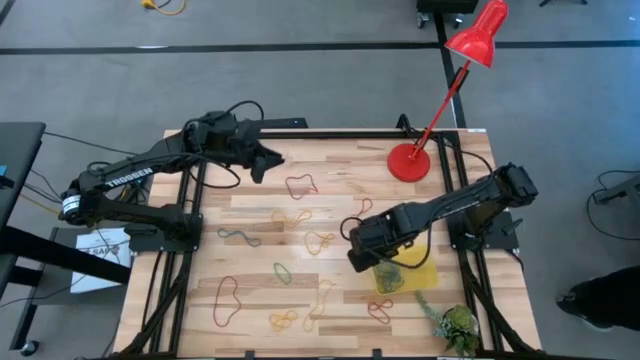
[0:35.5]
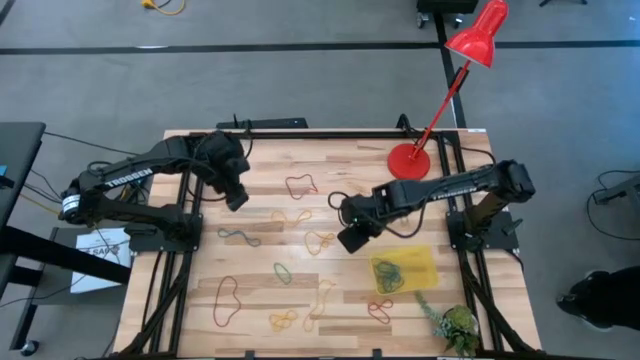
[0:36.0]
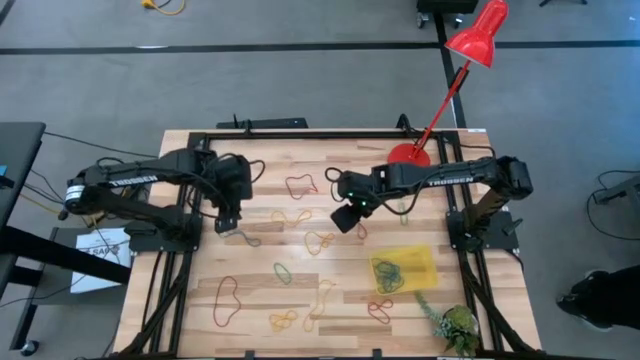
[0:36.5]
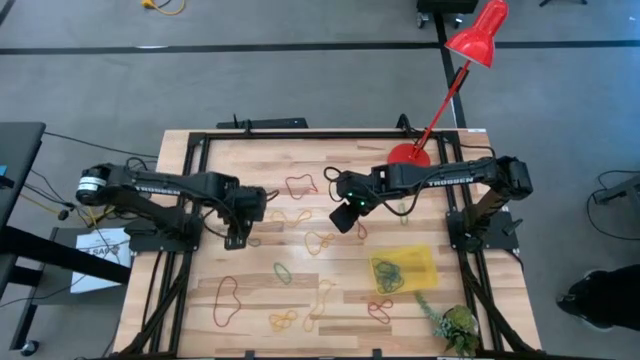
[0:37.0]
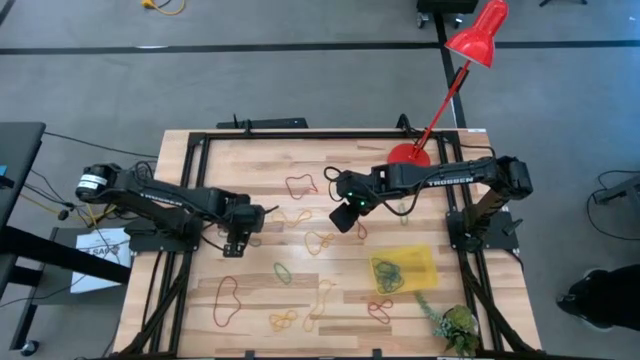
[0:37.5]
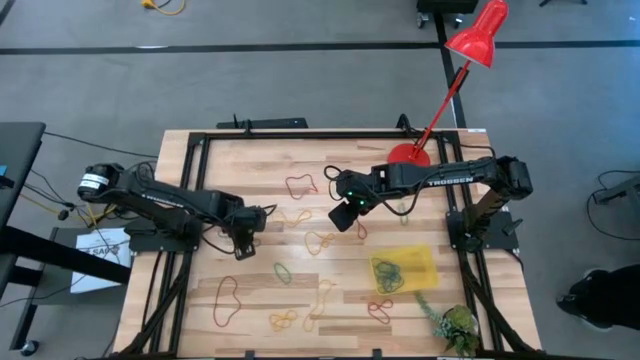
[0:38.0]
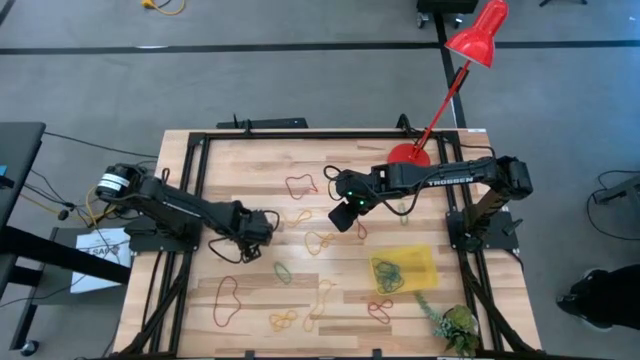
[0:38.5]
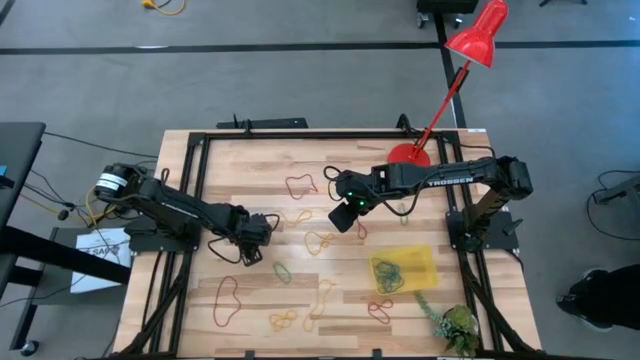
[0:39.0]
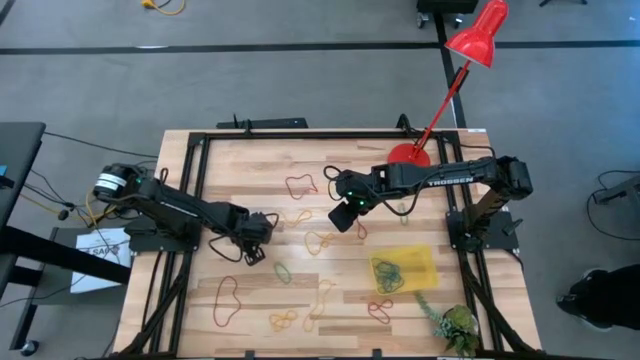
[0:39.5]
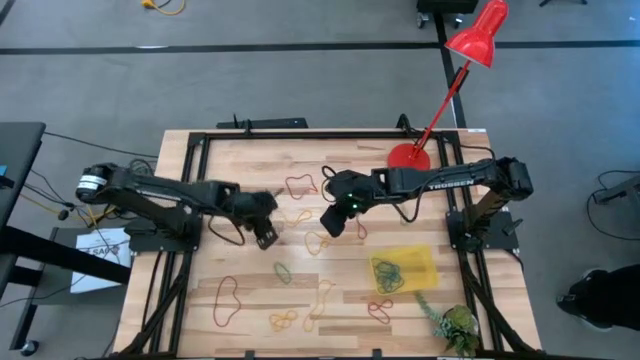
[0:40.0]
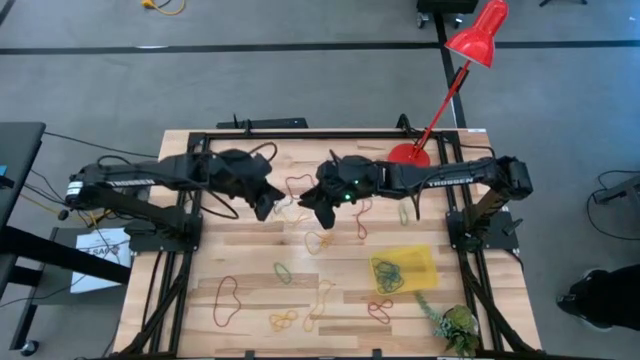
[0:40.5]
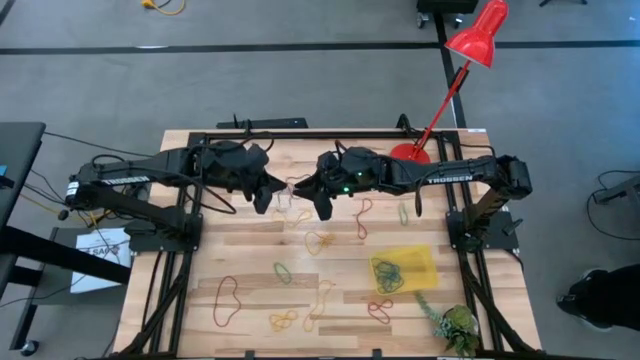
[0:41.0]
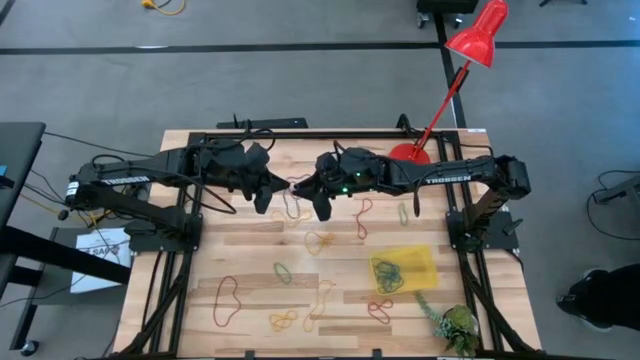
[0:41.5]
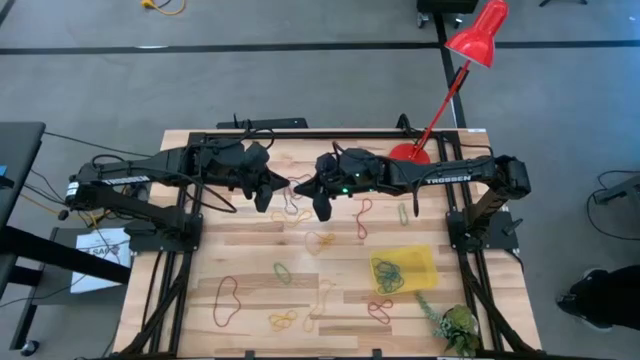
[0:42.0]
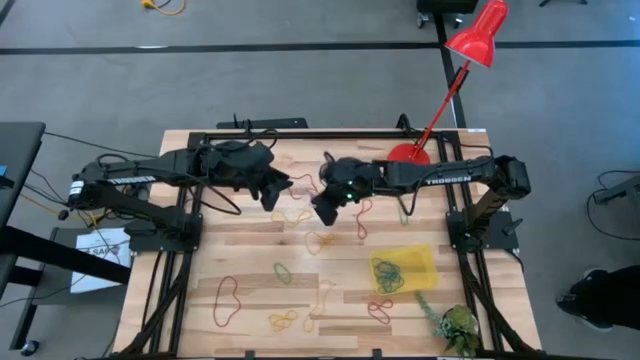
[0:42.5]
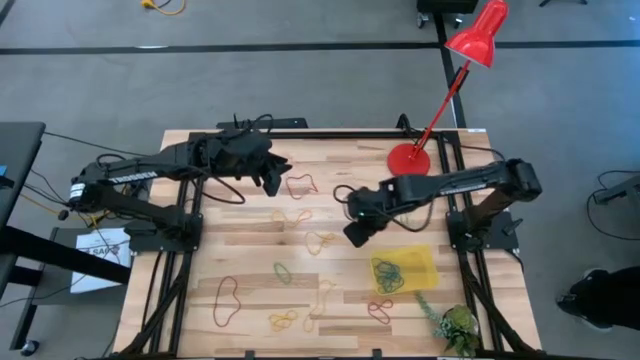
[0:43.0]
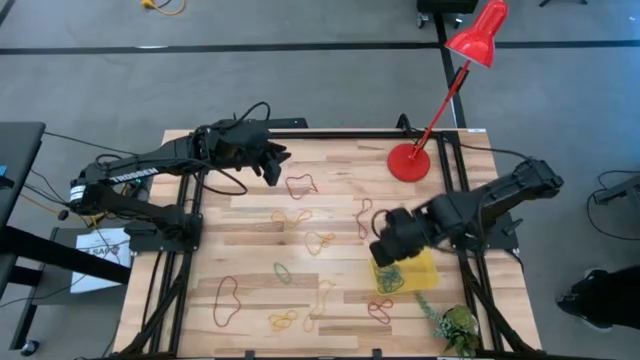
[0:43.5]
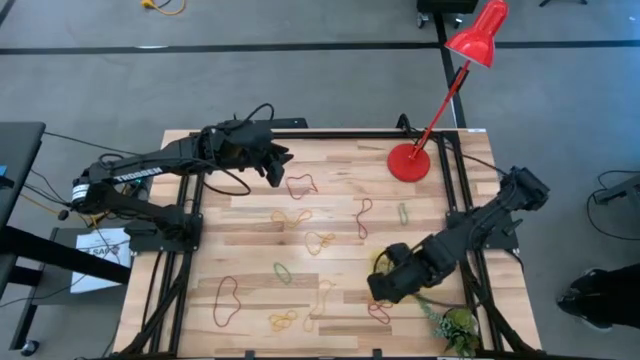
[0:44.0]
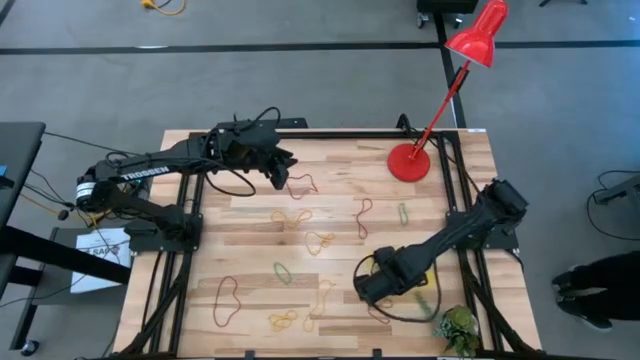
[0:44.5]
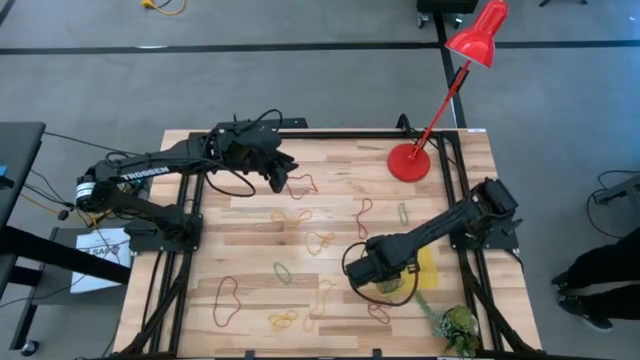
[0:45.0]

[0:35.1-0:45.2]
Task: Pick and place items into bin
Put the blue rubber band into the yellow bin

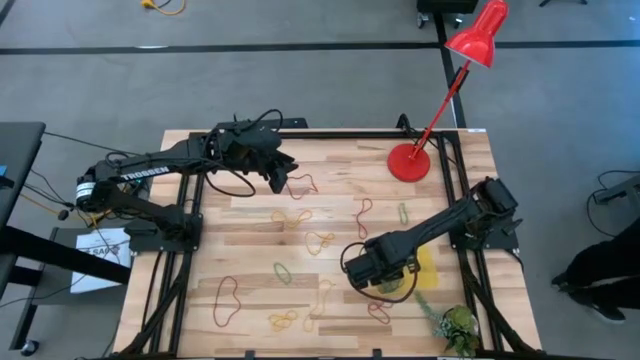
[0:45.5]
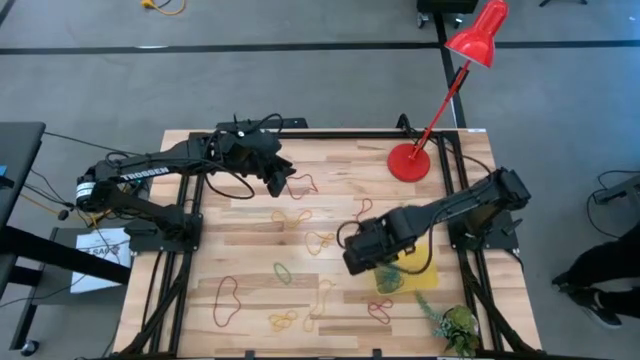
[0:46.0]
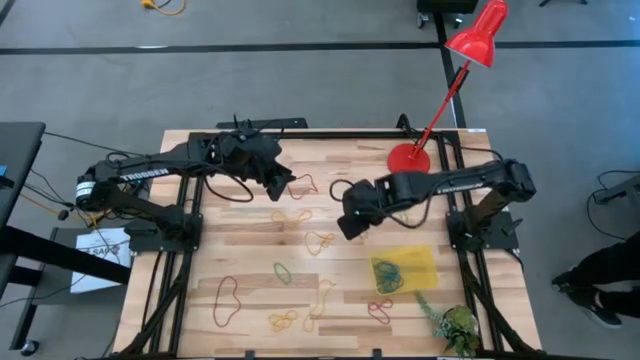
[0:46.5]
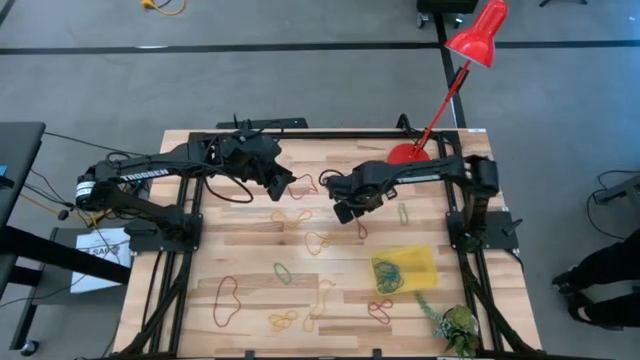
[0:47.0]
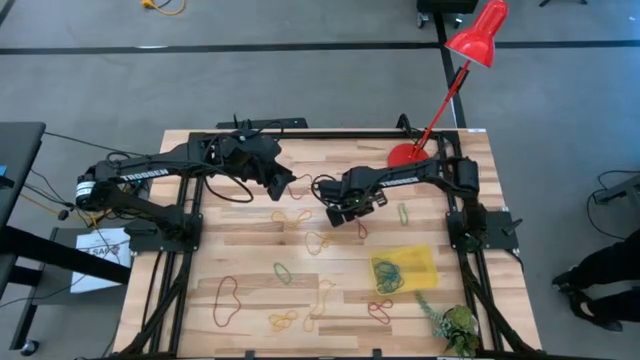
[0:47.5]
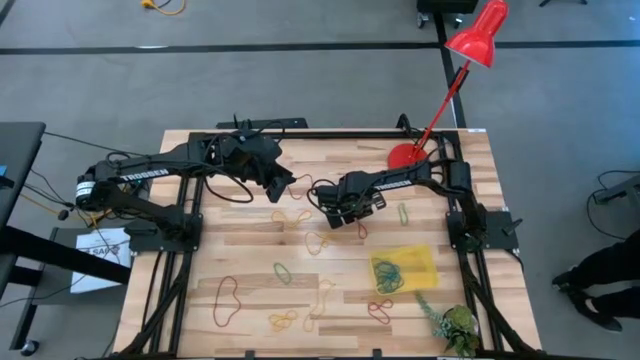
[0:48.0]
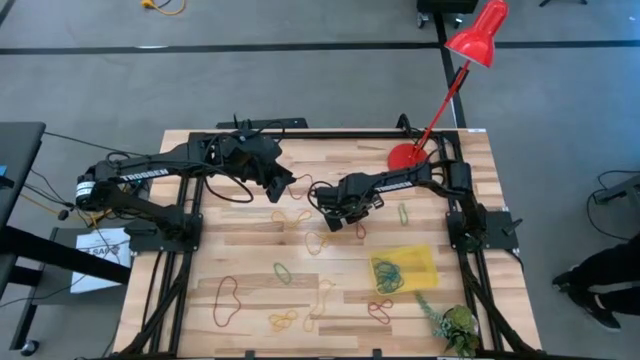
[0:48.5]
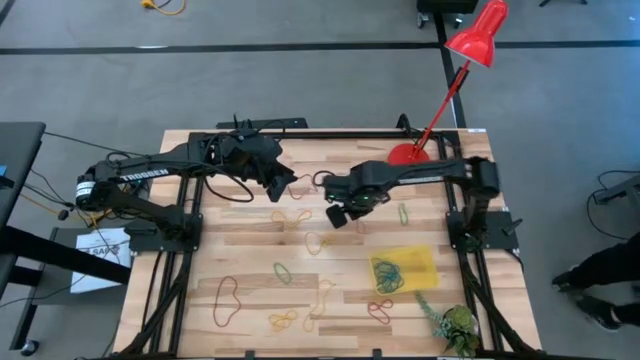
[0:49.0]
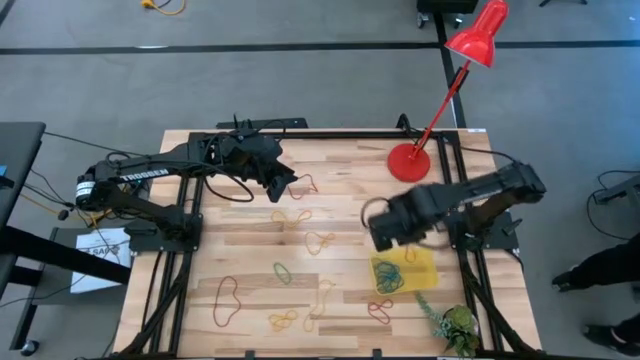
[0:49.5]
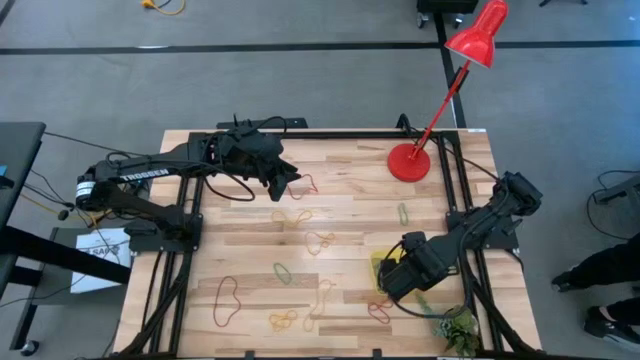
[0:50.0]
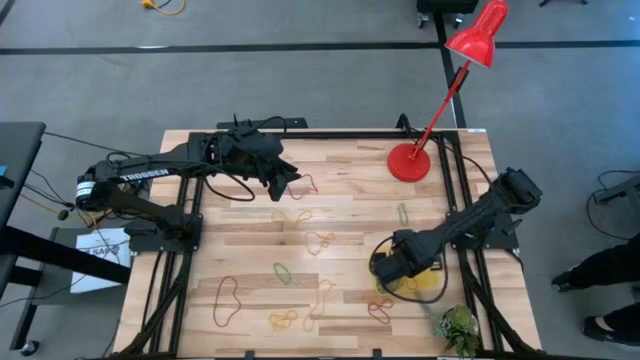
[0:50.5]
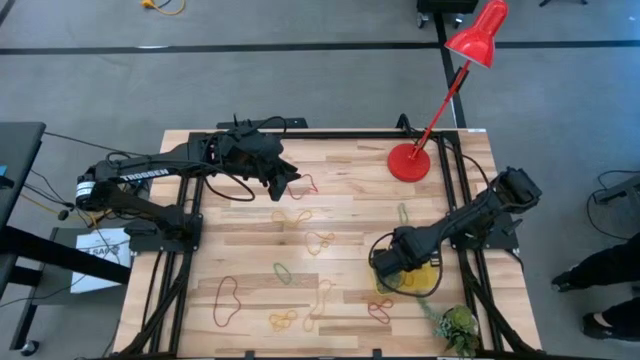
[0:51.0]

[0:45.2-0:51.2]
Put the red rubber band into the yellow bin

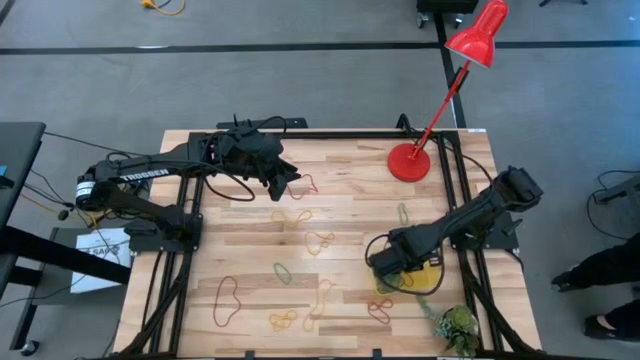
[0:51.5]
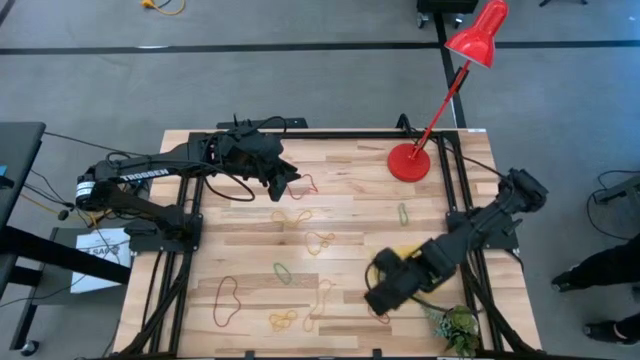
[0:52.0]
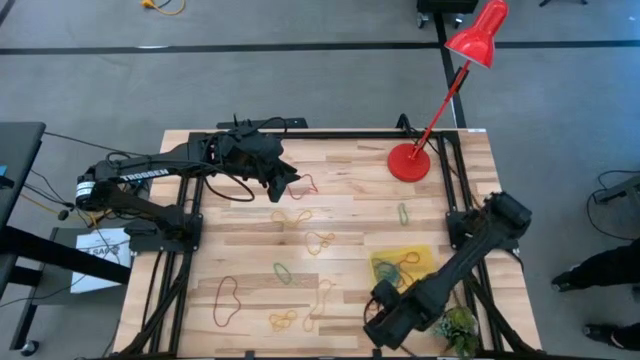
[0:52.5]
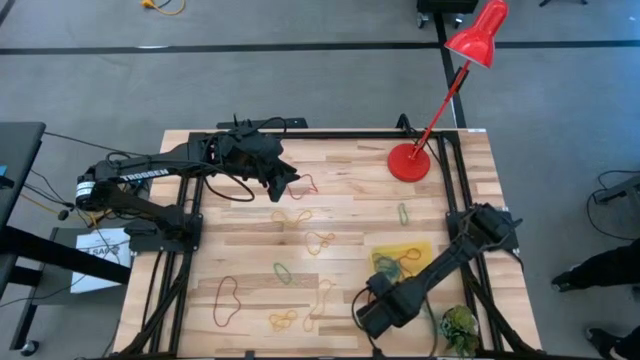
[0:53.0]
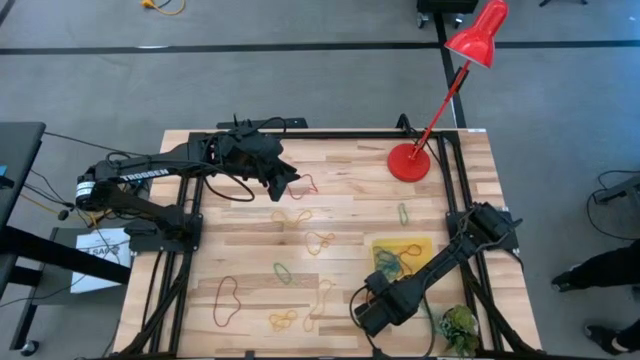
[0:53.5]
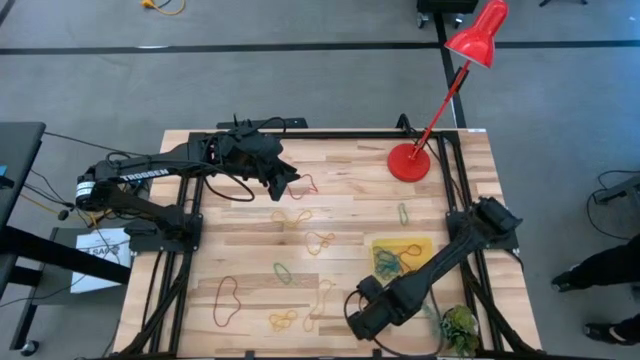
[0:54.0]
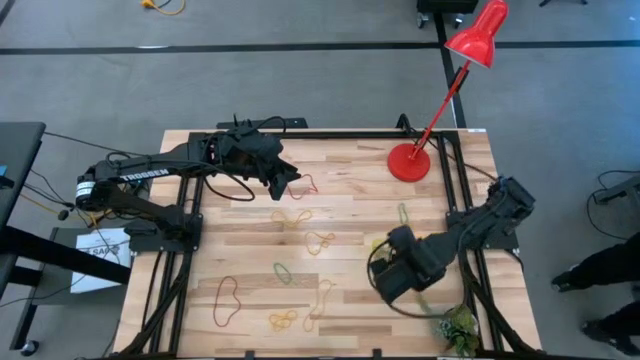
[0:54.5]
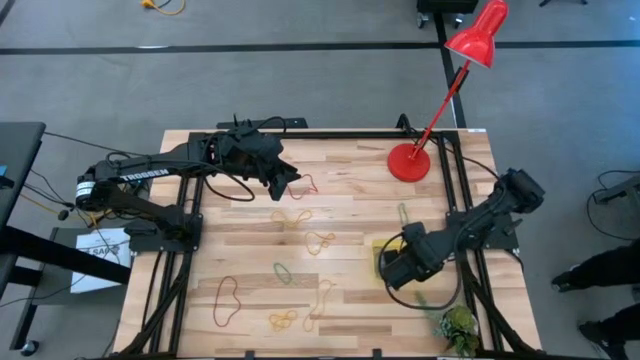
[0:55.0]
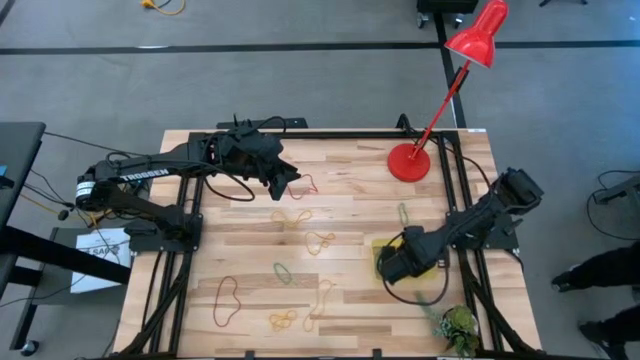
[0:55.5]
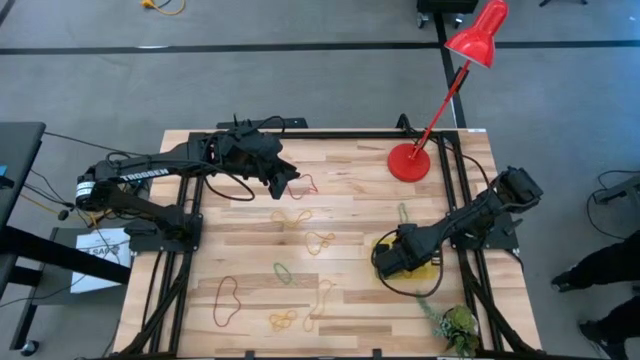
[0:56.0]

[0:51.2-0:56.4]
Put the red rubber band into the yellow bin

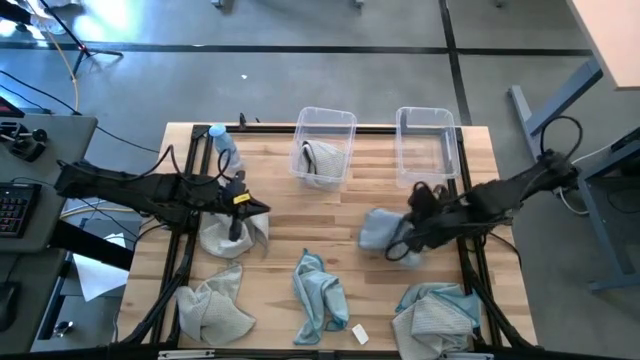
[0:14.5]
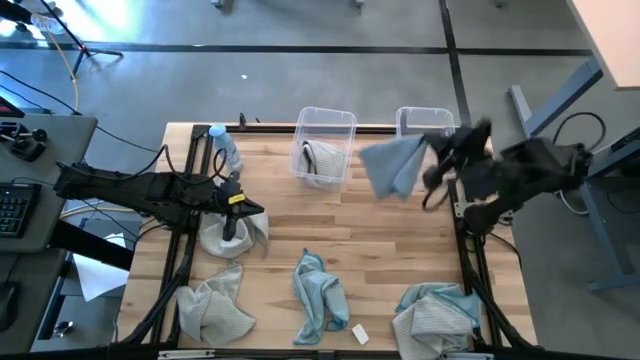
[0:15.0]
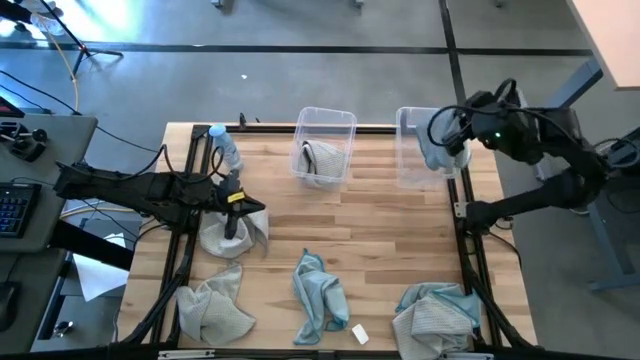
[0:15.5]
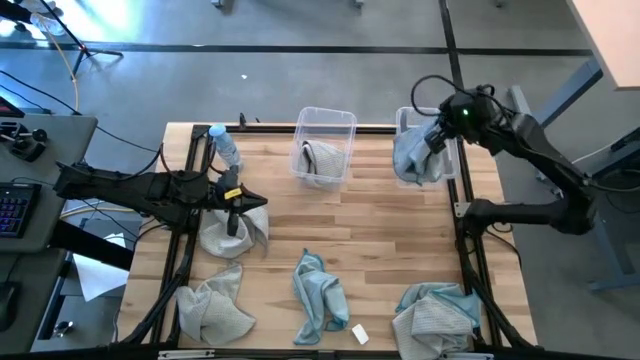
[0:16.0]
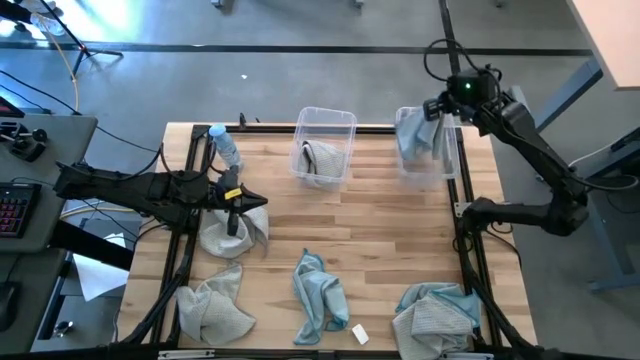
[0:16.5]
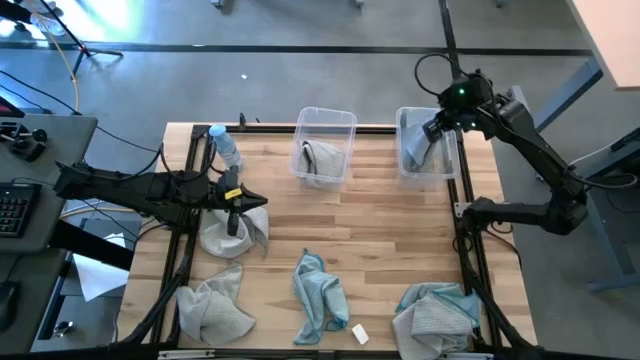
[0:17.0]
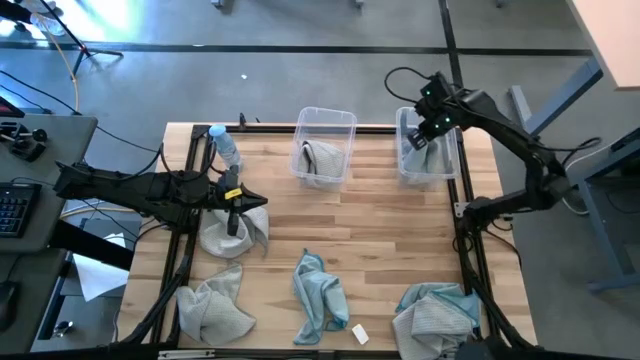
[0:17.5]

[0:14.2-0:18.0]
Task: Sort microfiber towel by color & place in baskets
Put the light blue microfiber cloth into the right transparent bin
